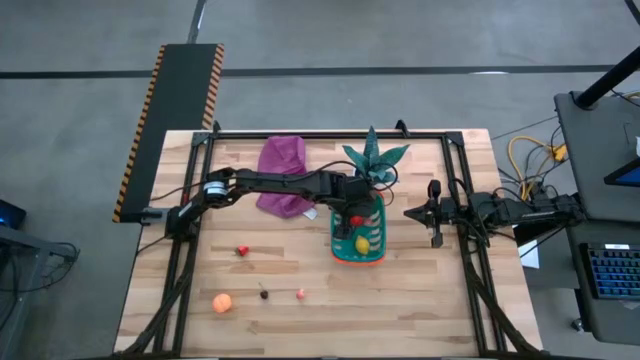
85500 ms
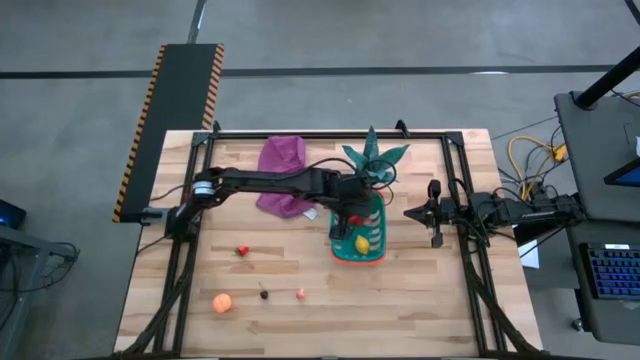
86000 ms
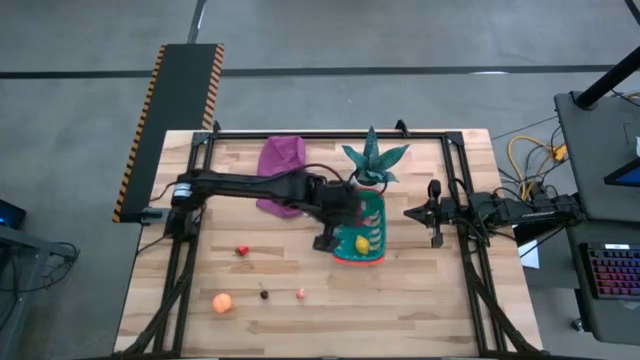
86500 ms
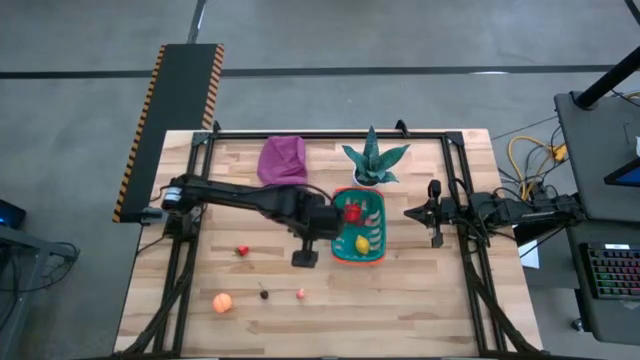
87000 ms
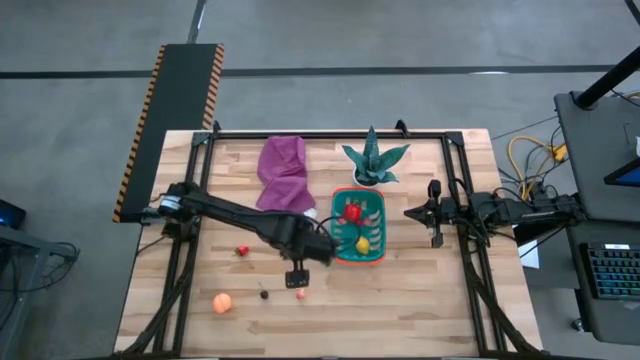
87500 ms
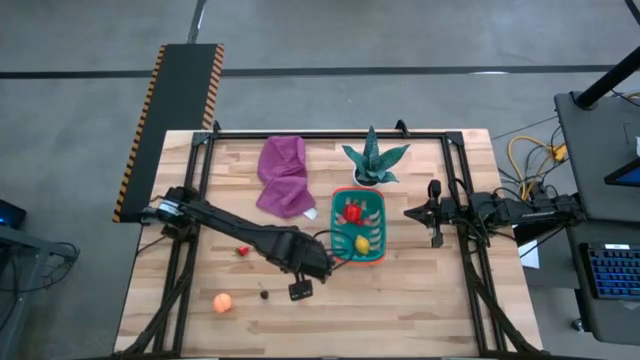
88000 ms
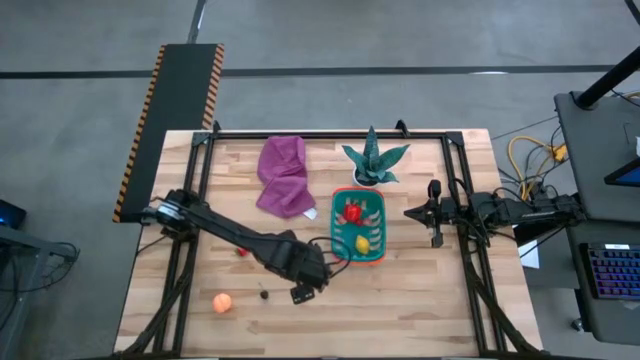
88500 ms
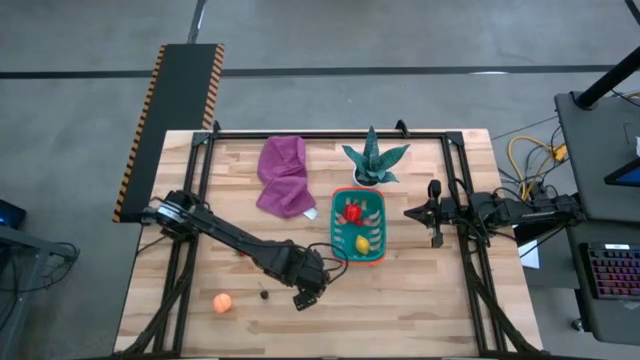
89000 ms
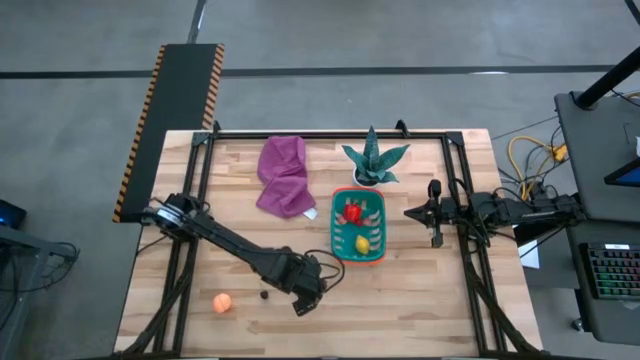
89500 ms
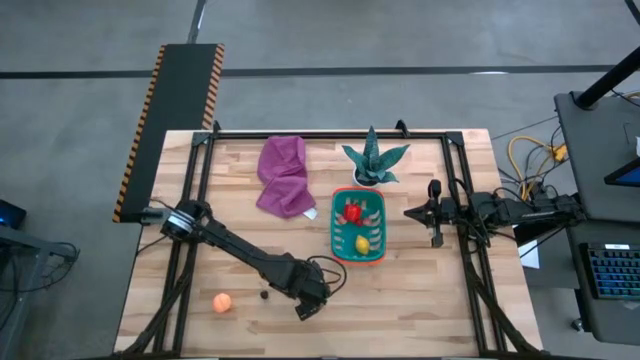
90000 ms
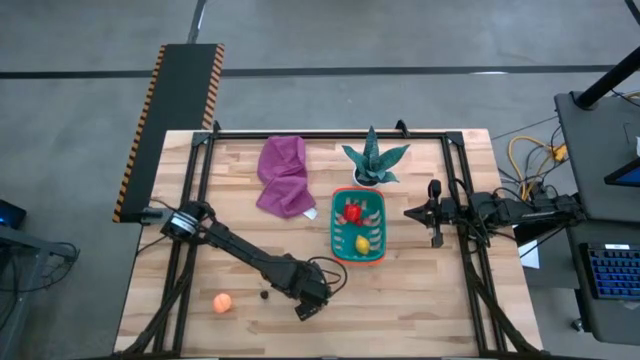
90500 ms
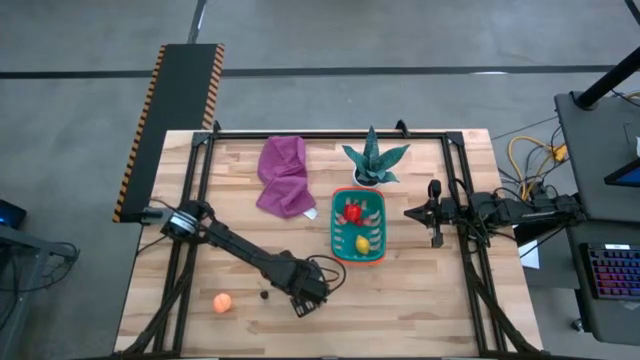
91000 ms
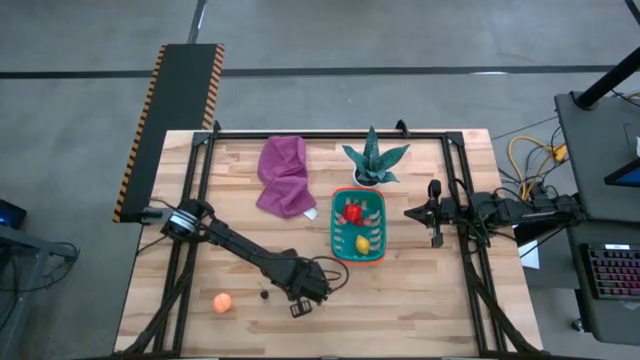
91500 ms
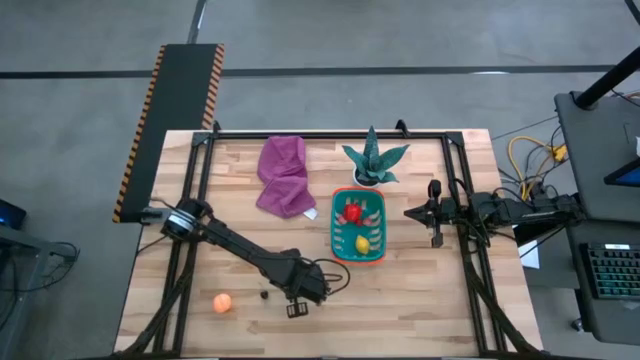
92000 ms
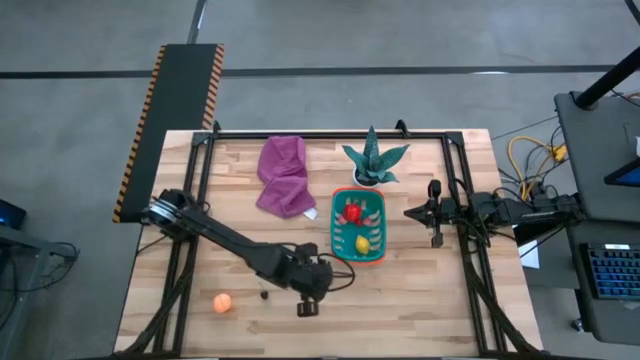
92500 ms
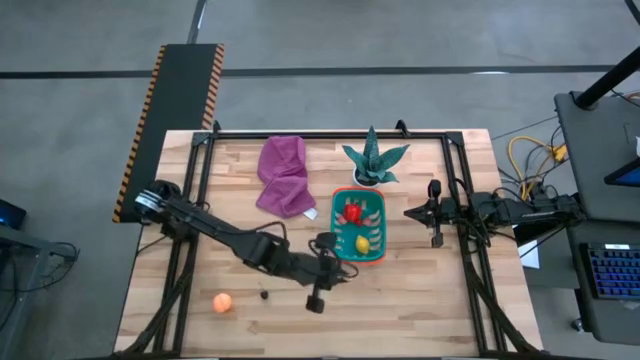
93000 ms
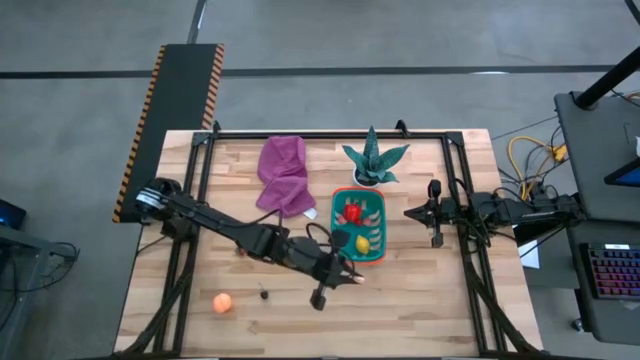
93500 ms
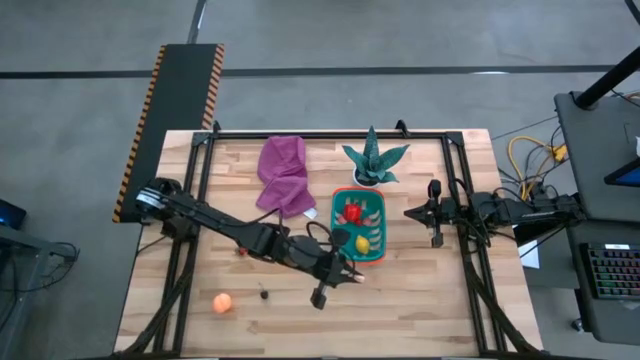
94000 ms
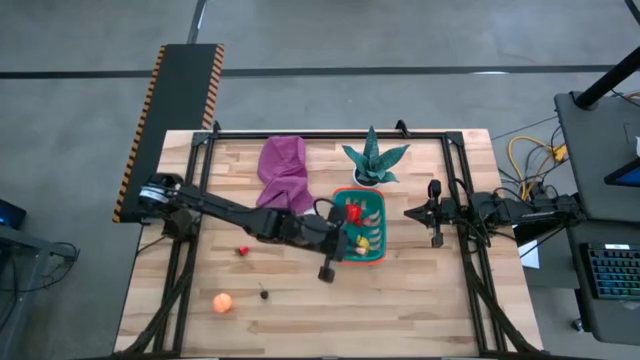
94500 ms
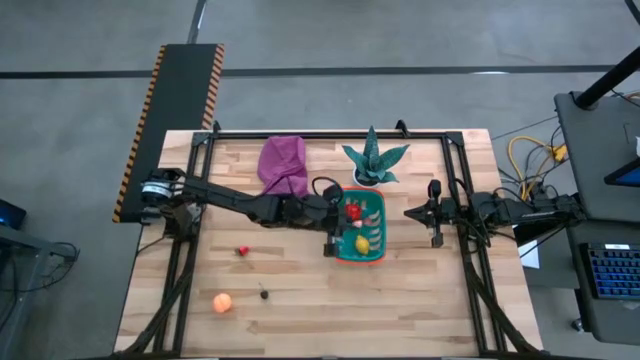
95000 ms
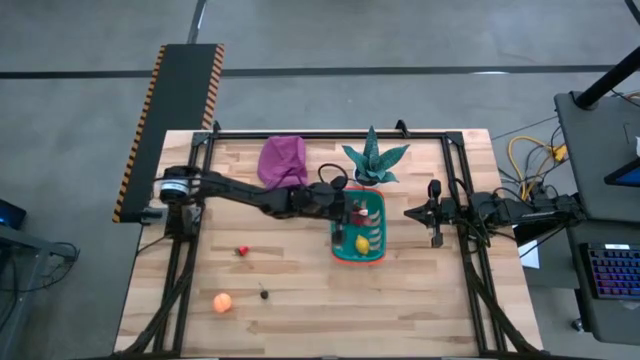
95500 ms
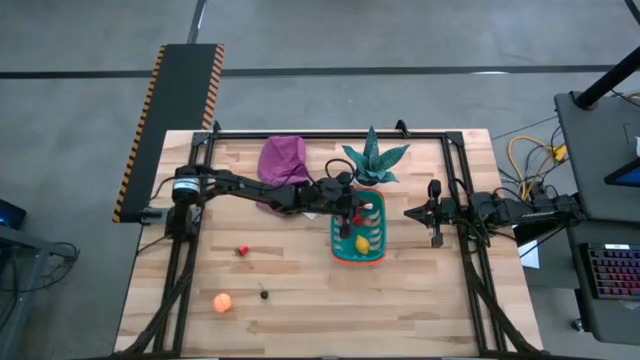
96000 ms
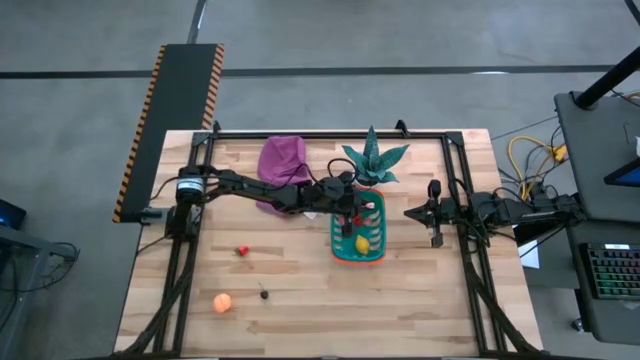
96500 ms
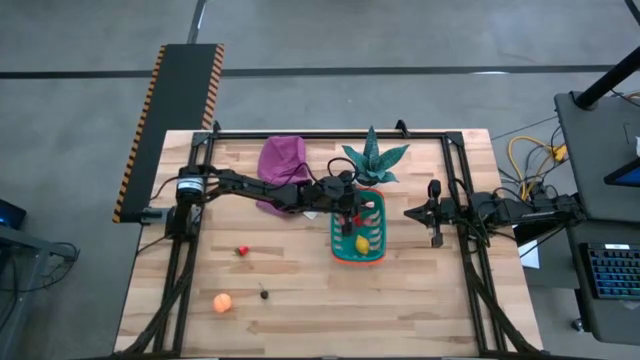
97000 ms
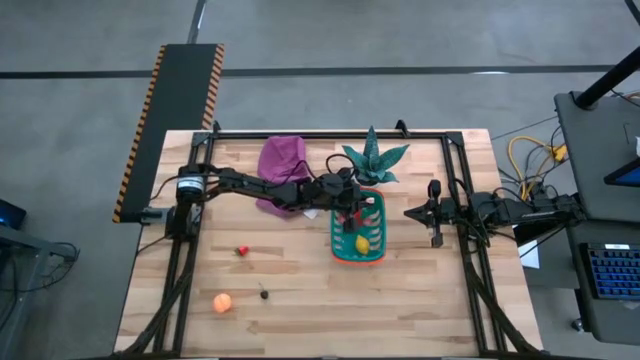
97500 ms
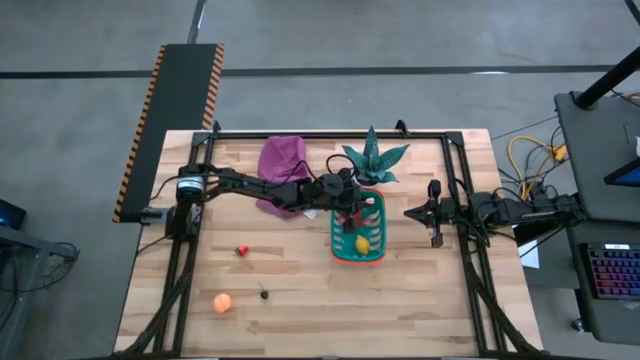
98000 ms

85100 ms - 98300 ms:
Task: Pick and placing Produce into tupperware
Put the right pink peach into the blue basket
